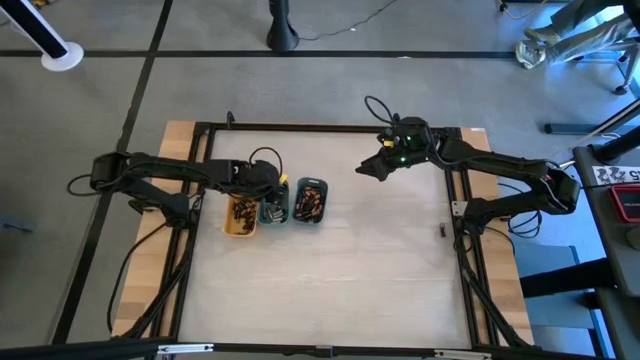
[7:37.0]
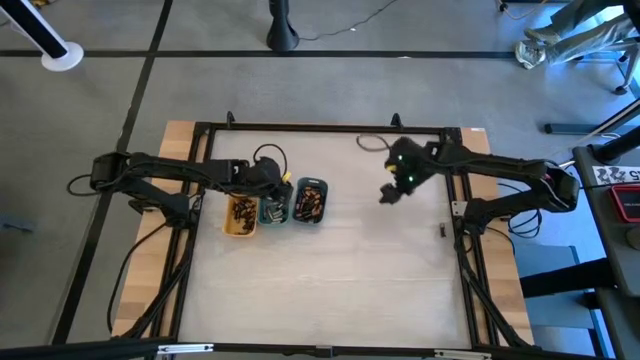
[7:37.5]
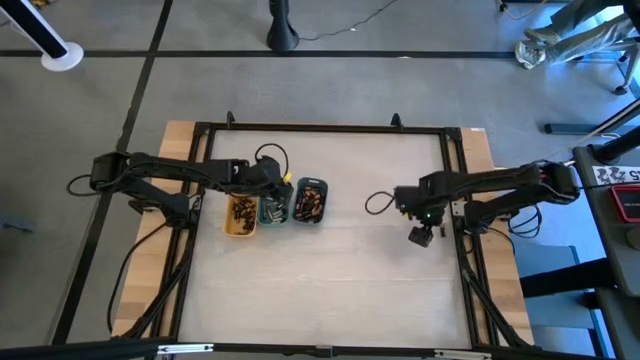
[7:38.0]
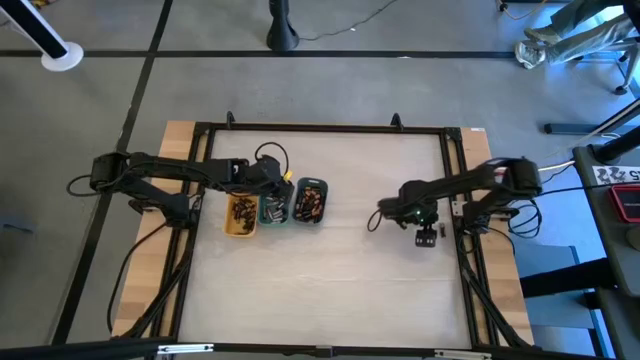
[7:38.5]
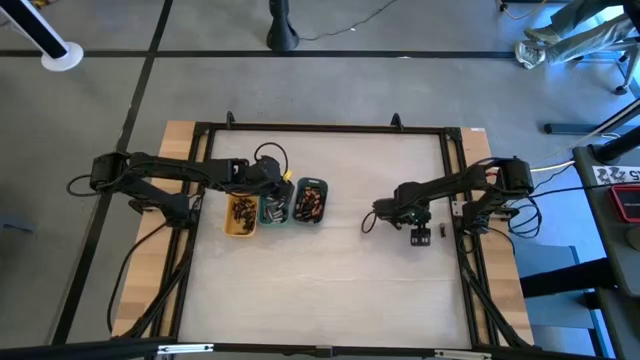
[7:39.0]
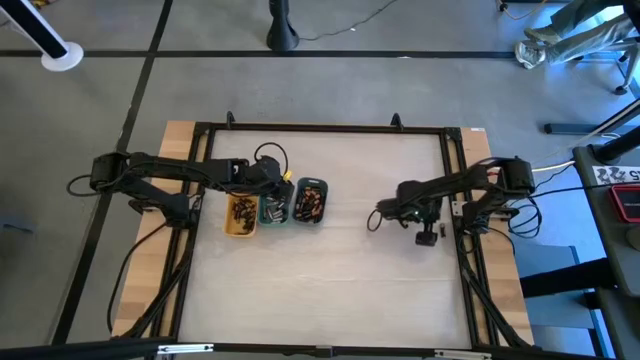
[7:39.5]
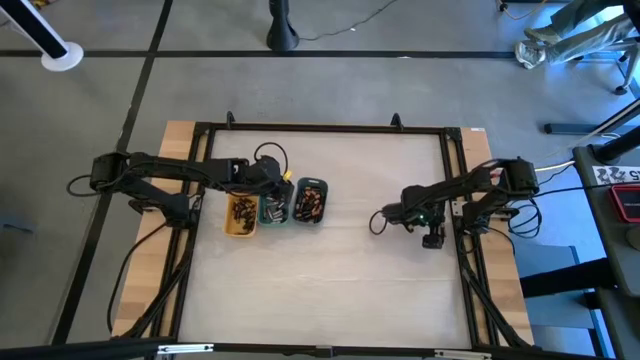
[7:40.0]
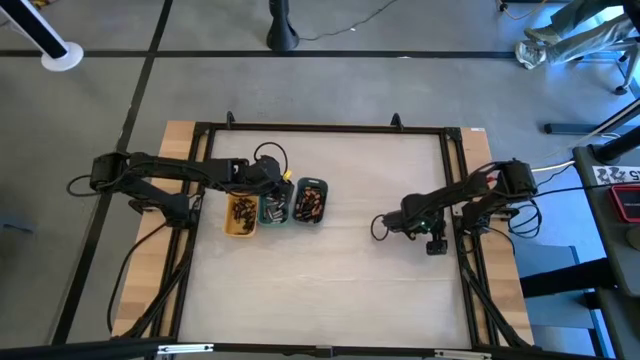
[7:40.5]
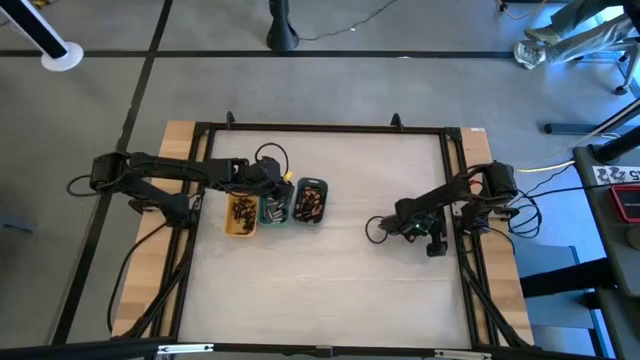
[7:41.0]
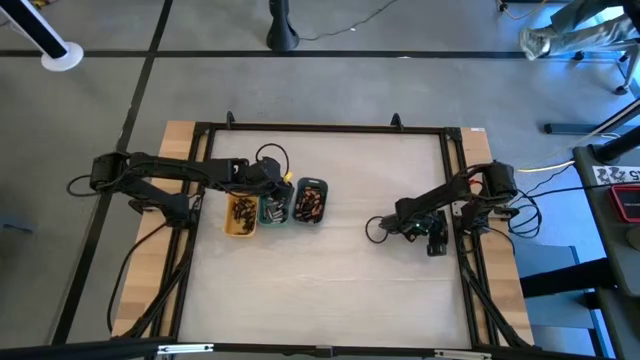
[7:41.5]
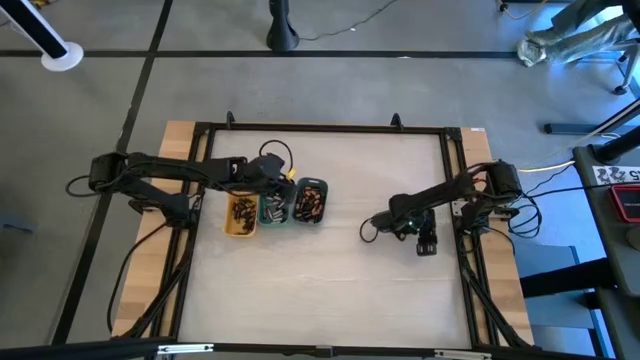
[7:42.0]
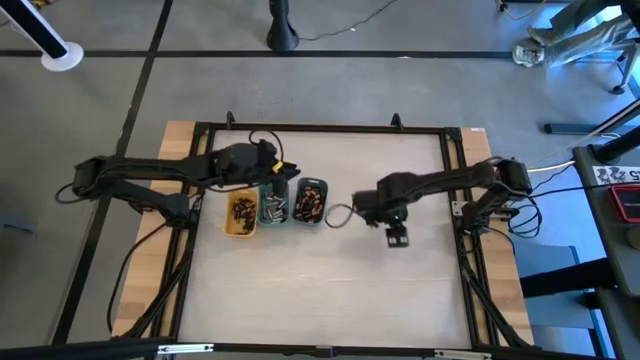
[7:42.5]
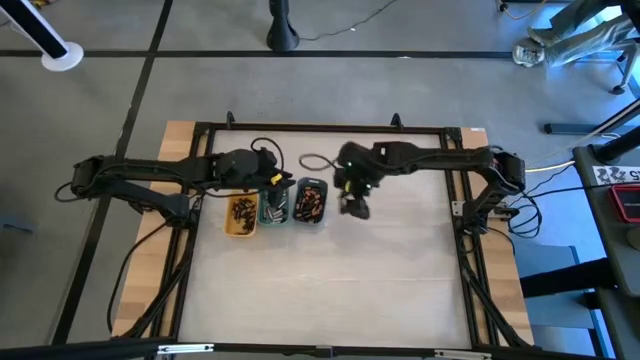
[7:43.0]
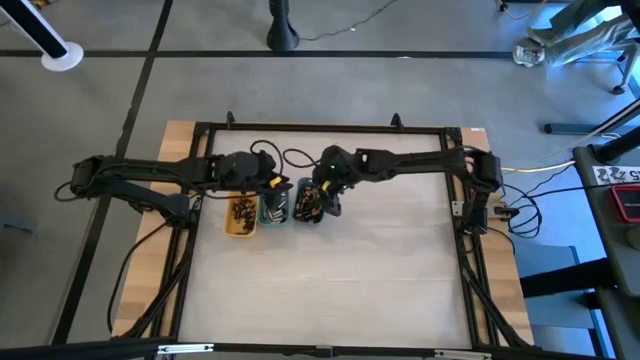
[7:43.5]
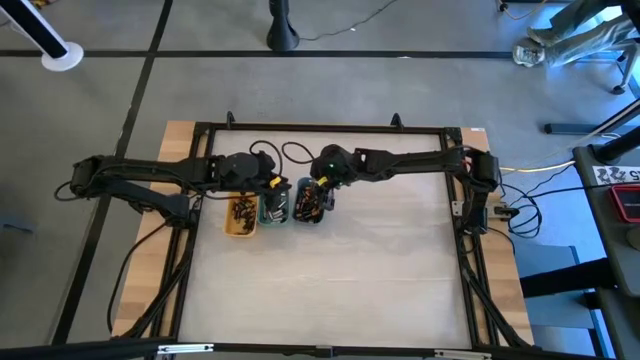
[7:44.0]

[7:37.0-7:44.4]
Task: Sort batteries
Put the large black battery into the blue bin

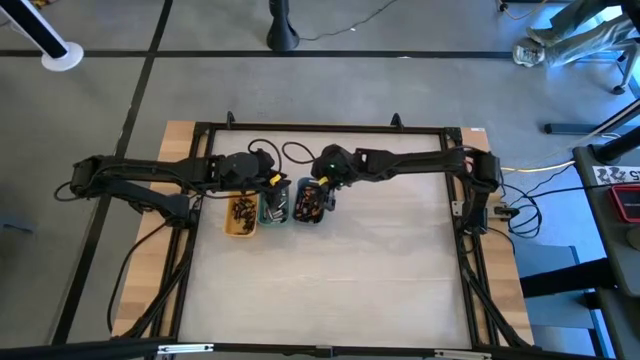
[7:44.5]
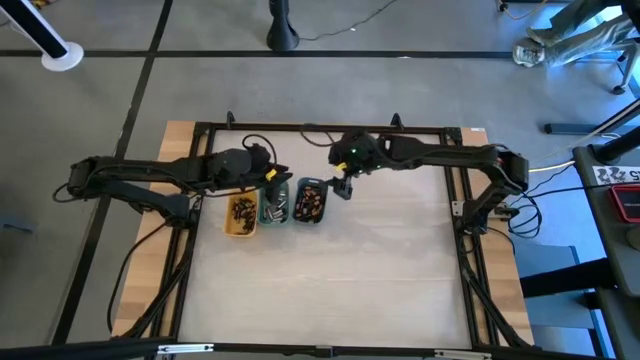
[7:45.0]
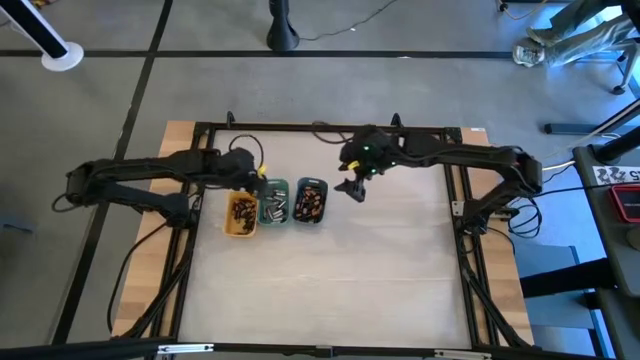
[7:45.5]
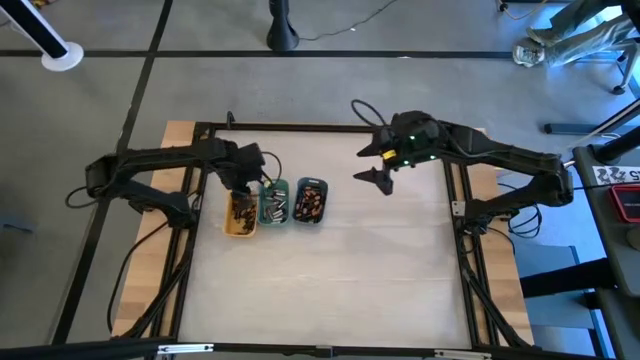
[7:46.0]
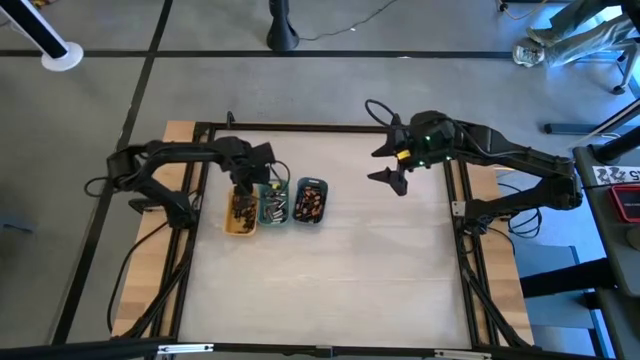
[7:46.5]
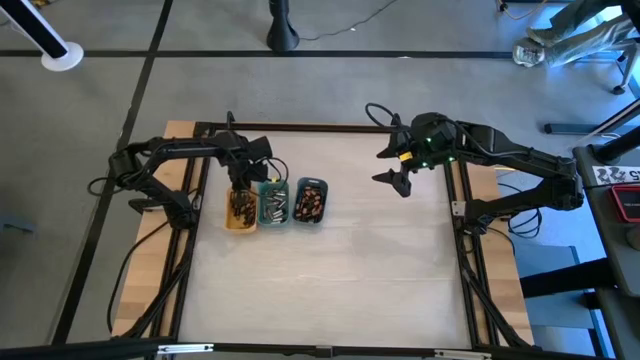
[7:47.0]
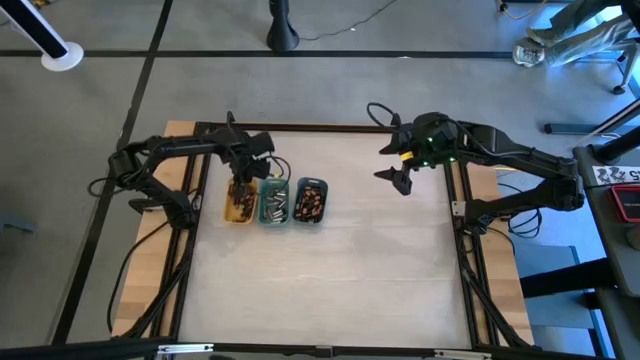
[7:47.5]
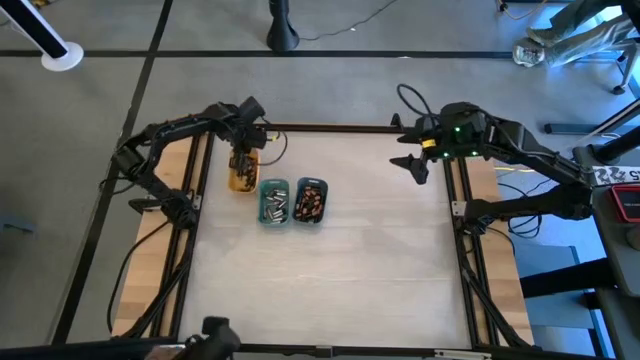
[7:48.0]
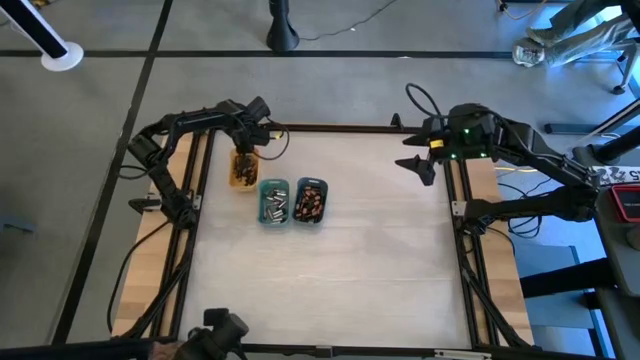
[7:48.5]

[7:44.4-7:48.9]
Move the yellow bin to the top left of the table

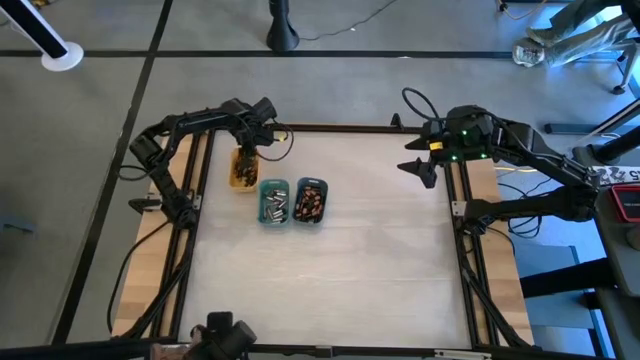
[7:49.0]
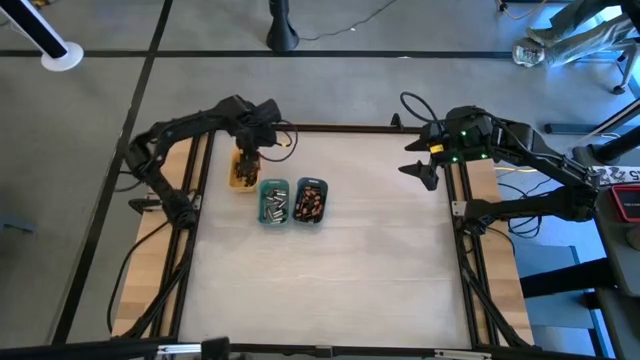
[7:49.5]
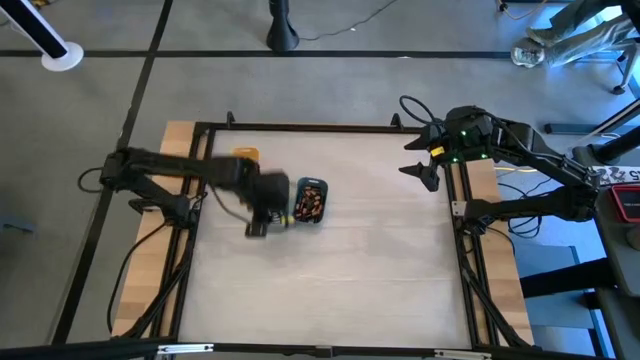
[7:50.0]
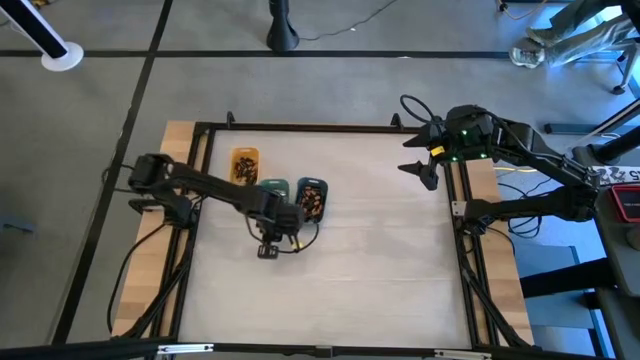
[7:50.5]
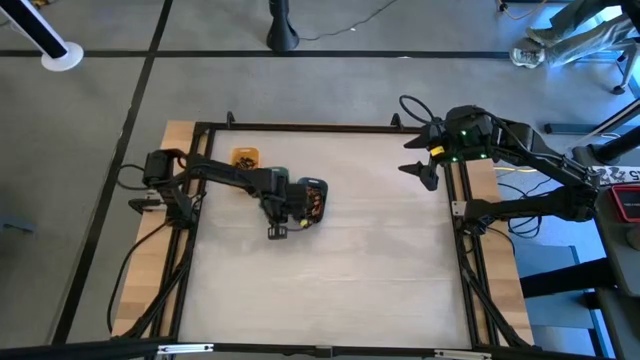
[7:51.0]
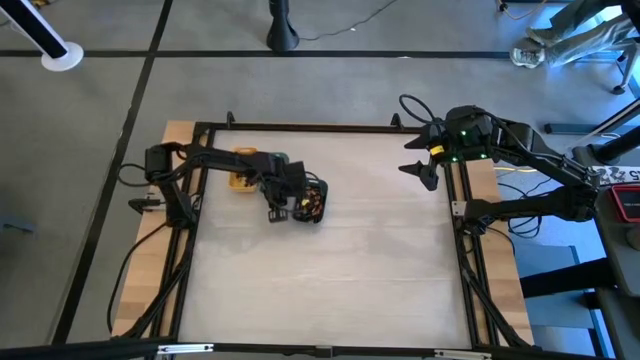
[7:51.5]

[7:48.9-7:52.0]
Move the green bin to the top left of the table

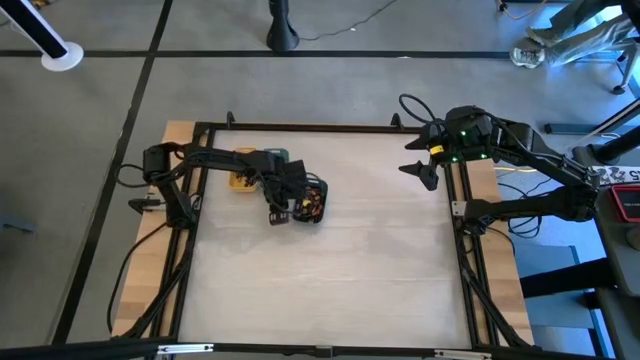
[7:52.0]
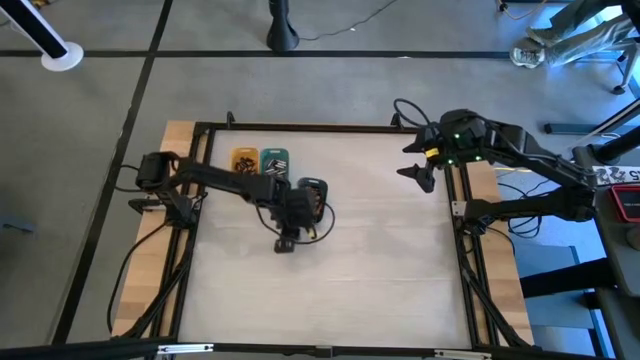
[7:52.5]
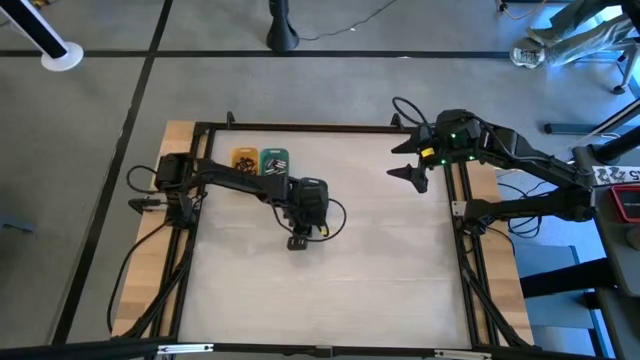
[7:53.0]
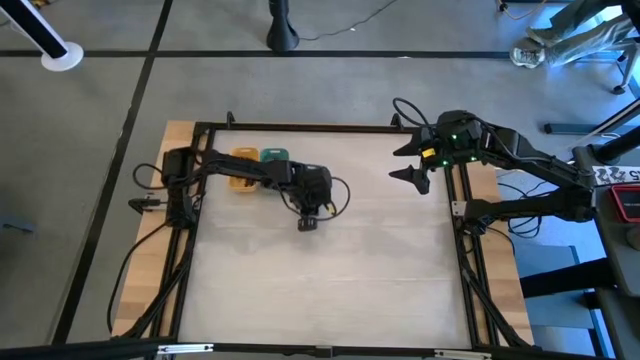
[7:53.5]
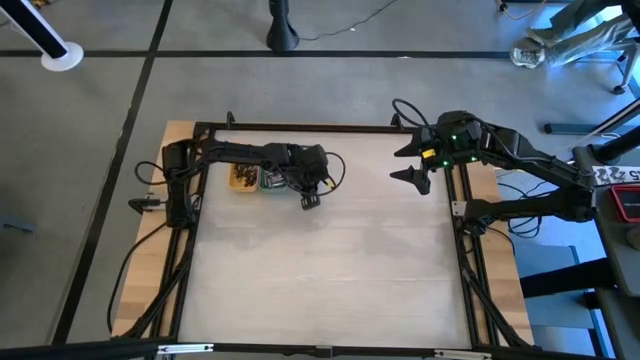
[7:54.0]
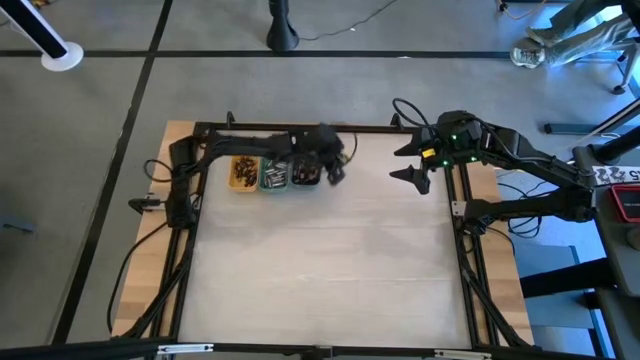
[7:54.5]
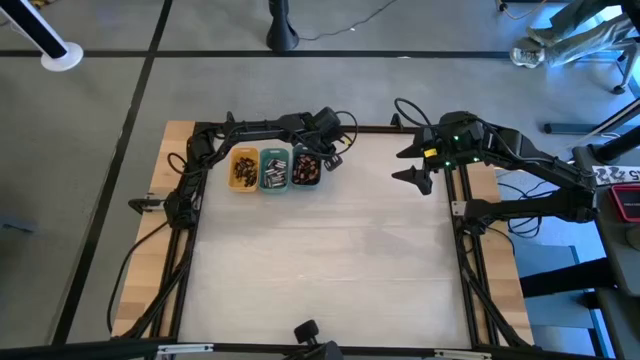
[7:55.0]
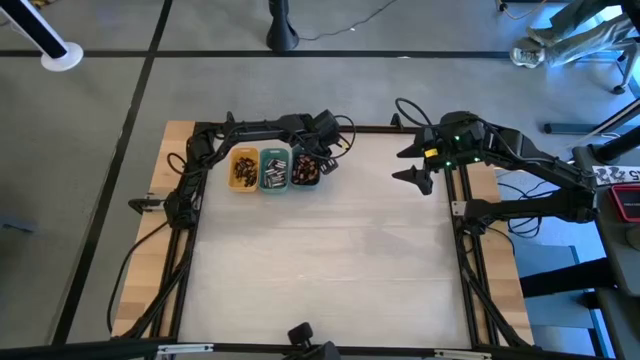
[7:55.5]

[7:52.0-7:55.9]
Move the blue bin to the top center of the table

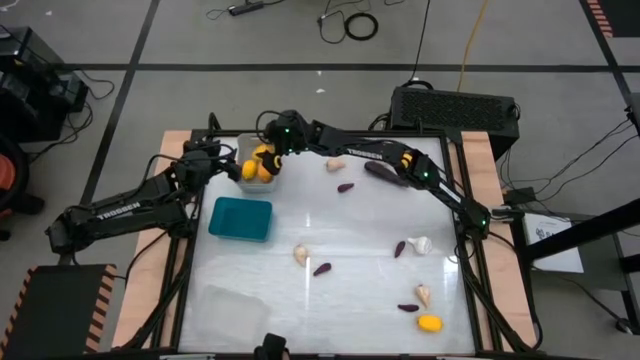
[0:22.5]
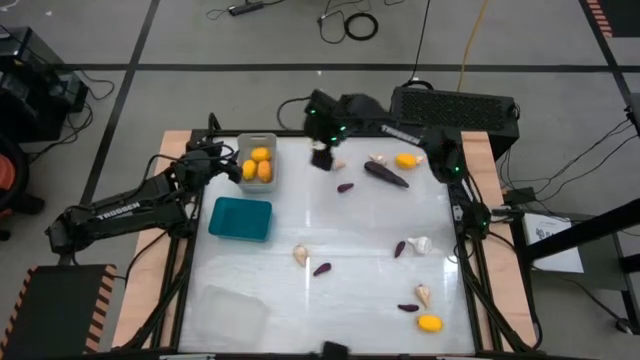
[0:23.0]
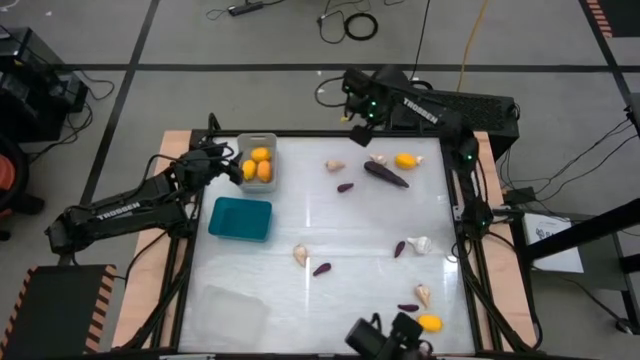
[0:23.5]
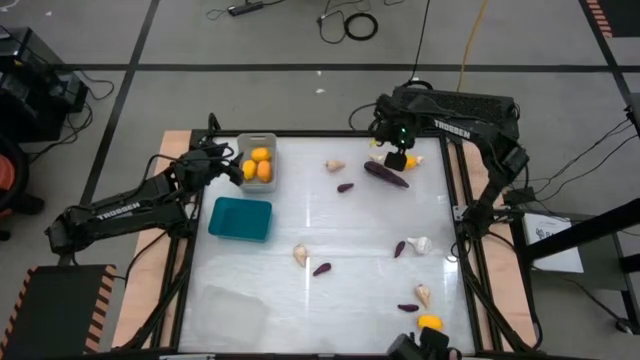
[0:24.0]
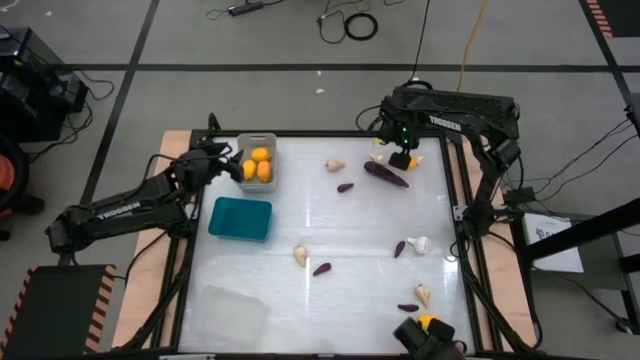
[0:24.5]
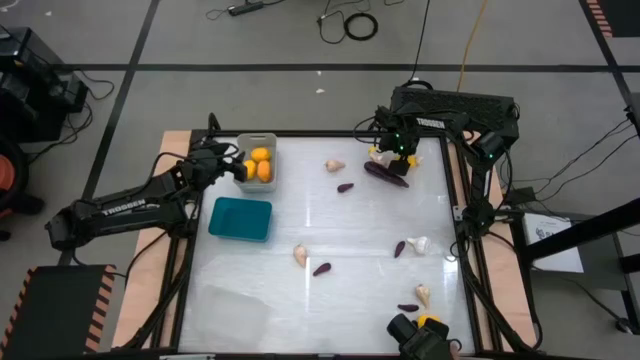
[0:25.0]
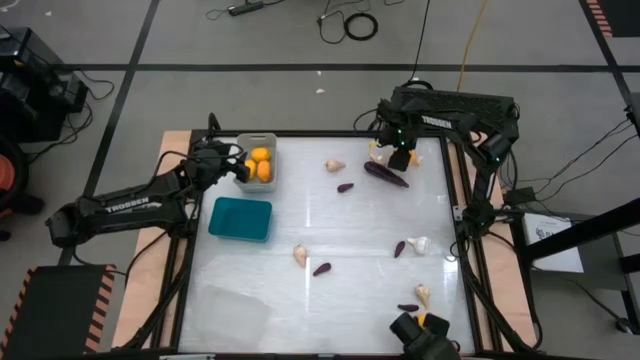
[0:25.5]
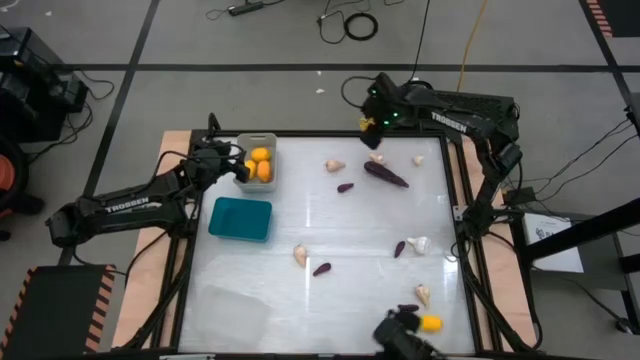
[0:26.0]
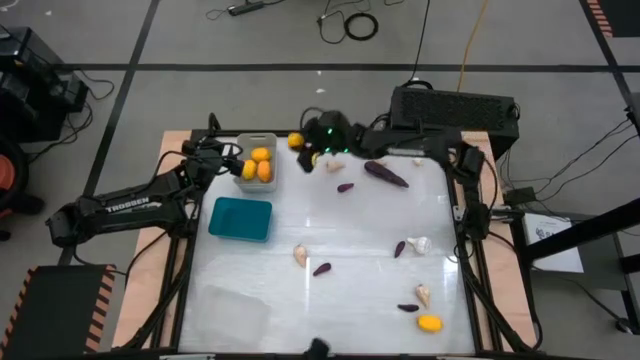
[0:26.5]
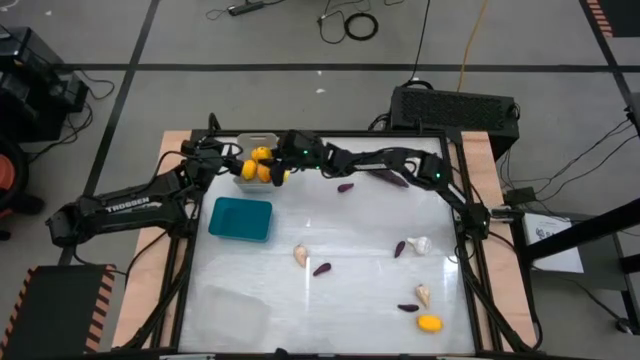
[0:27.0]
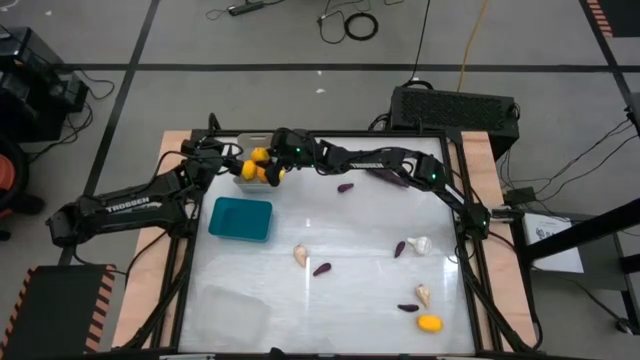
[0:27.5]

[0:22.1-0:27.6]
Task: Sort produce into baskets
Put the yellow lemon into the gray bin
